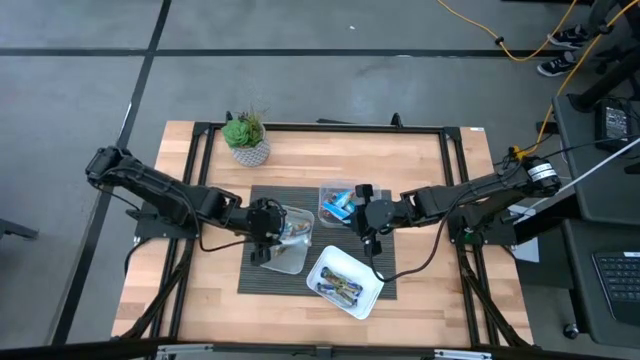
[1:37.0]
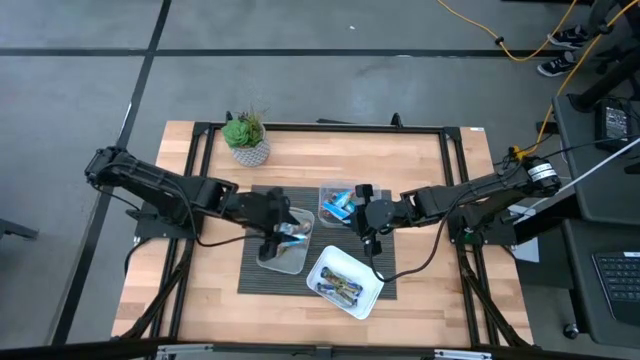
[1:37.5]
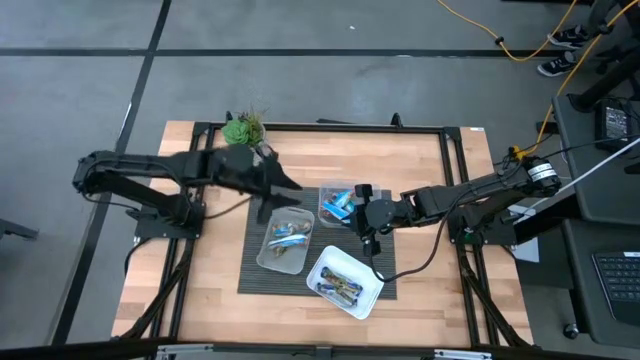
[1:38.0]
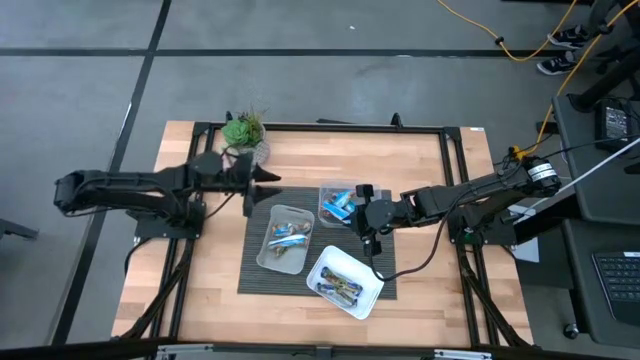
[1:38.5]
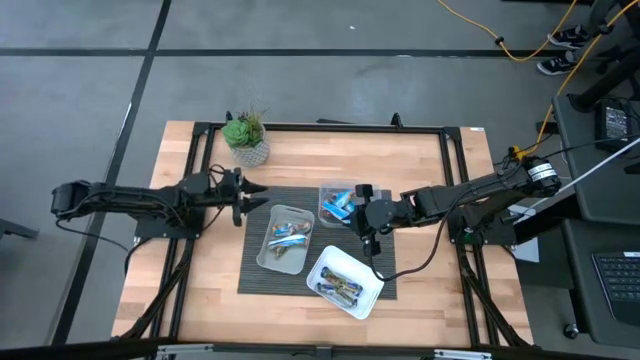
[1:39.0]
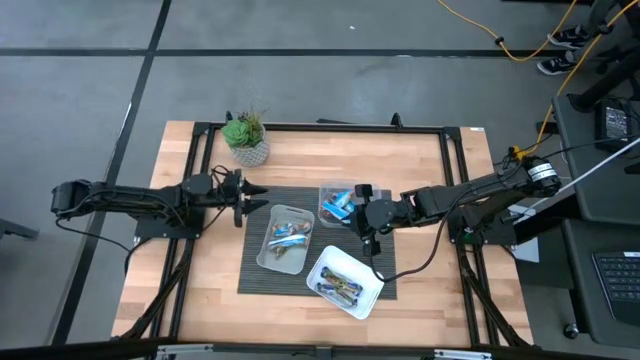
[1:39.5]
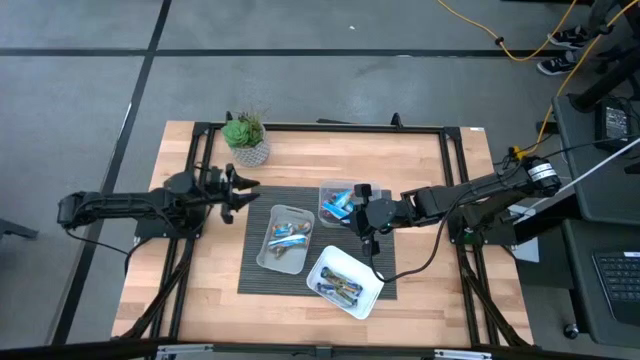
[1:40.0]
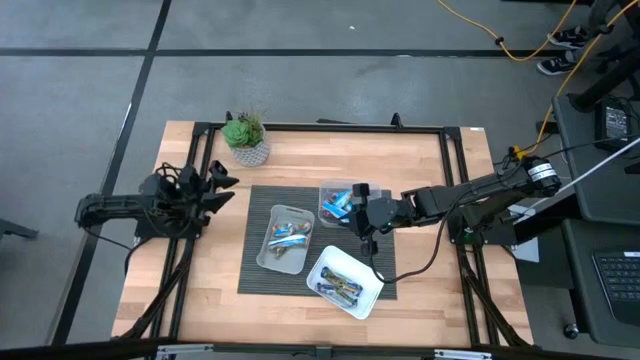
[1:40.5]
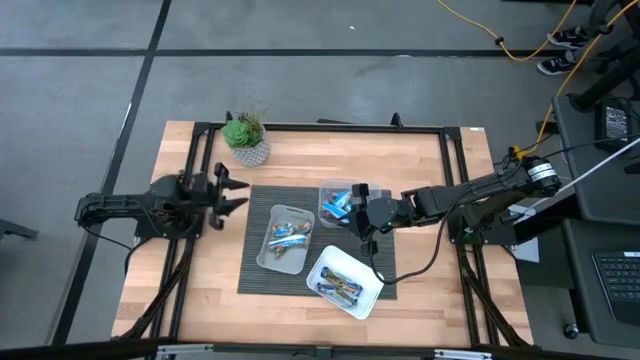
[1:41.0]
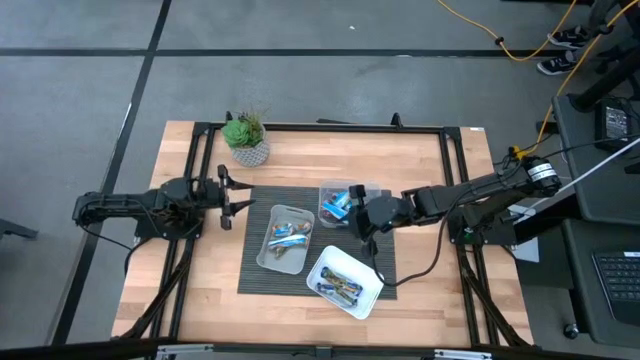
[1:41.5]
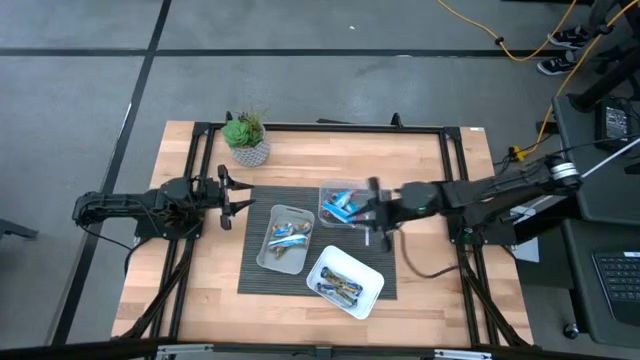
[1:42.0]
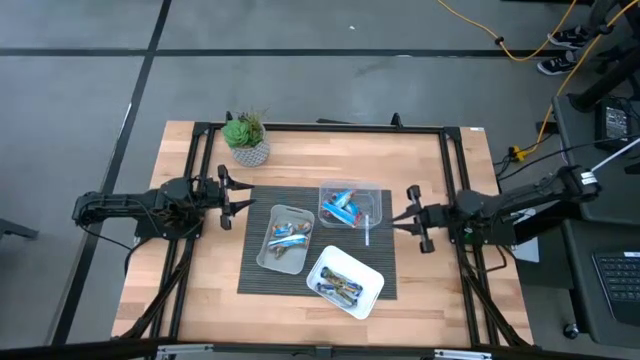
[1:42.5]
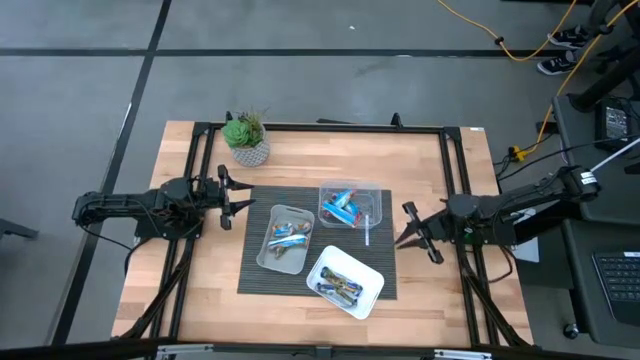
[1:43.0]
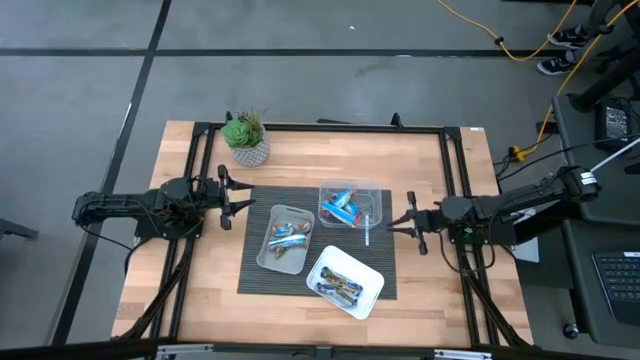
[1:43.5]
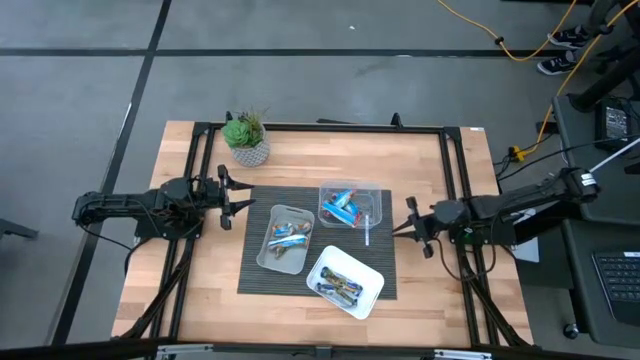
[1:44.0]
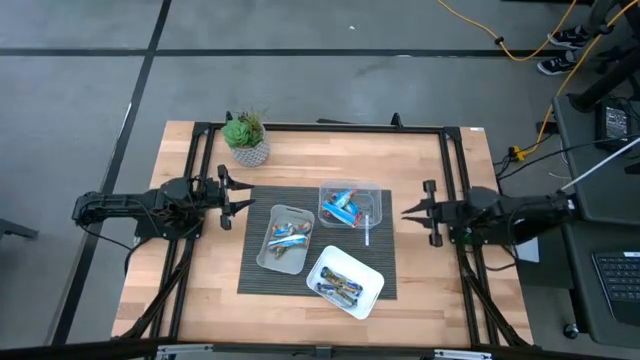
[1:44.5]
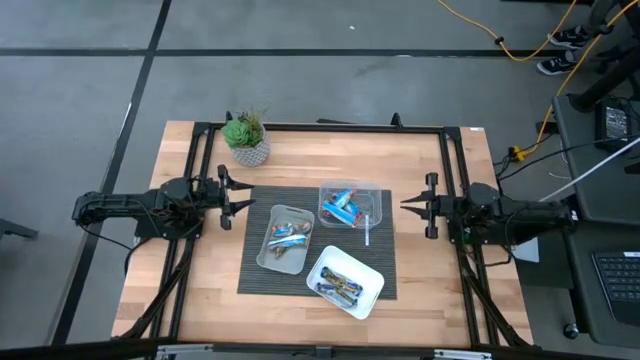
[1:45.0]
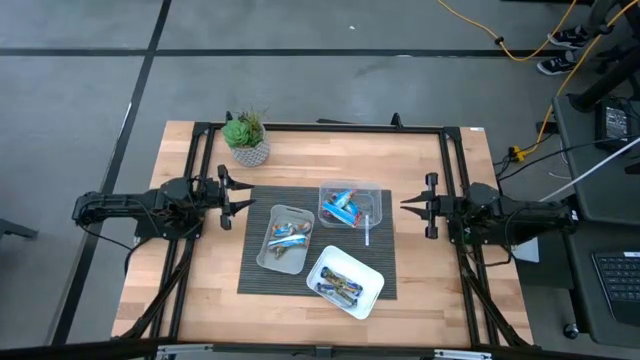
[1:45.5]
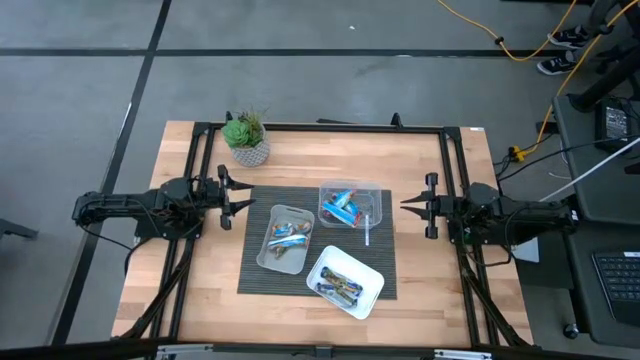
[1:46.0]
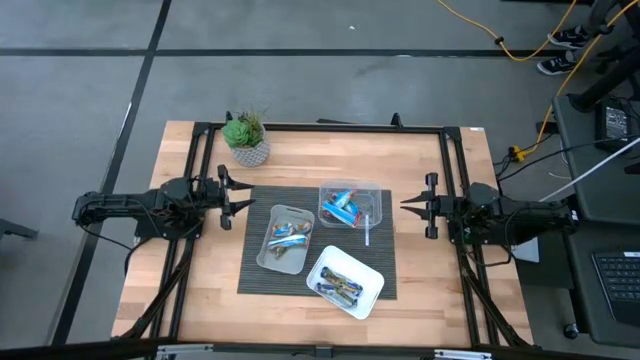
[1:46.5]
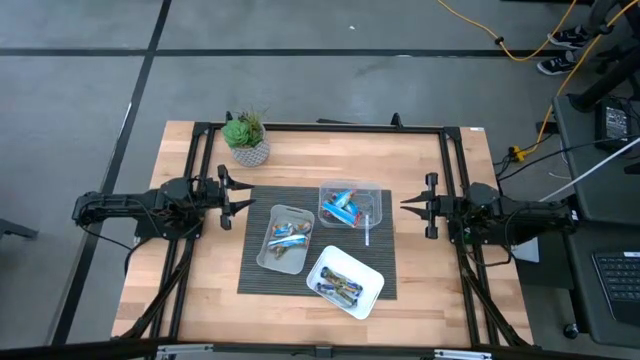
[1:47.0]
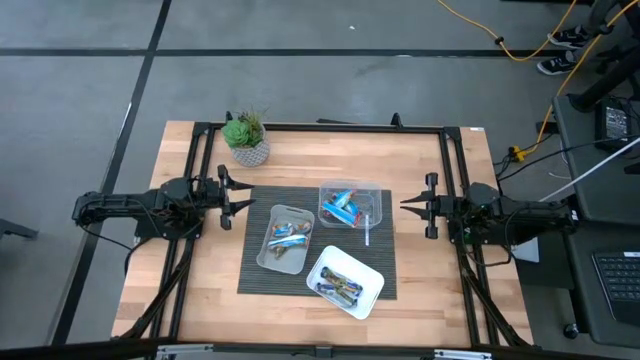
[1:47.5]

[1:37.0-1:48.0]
Task: Pick and place Granola Bars by type
Return to Home Position

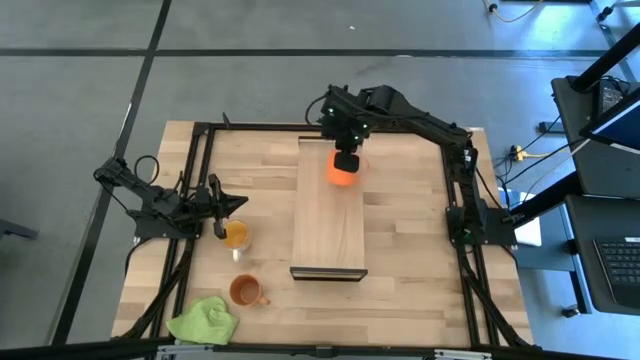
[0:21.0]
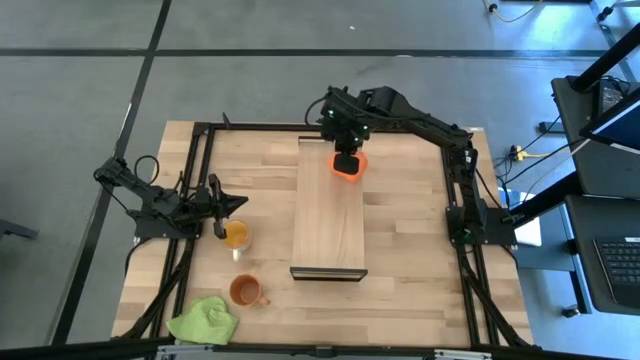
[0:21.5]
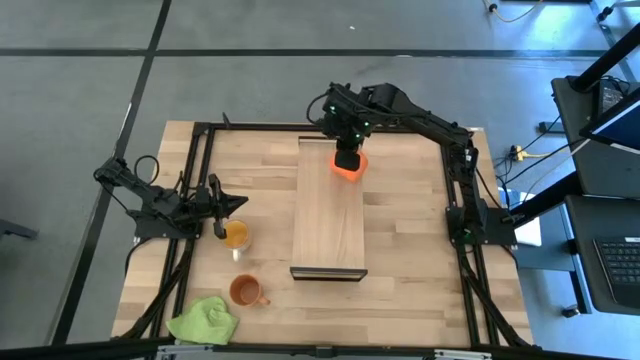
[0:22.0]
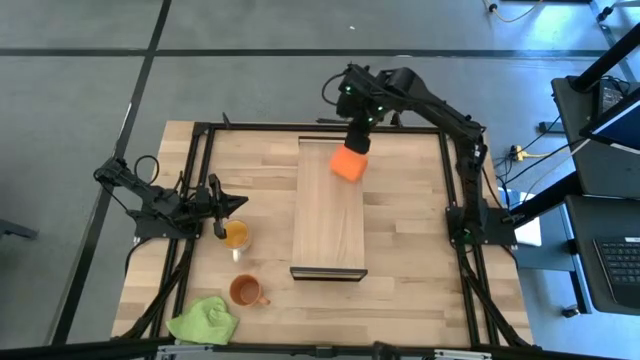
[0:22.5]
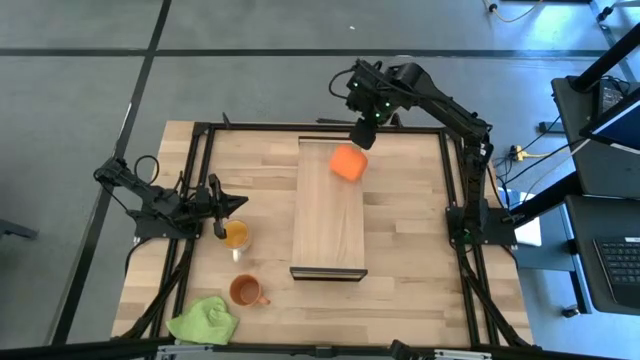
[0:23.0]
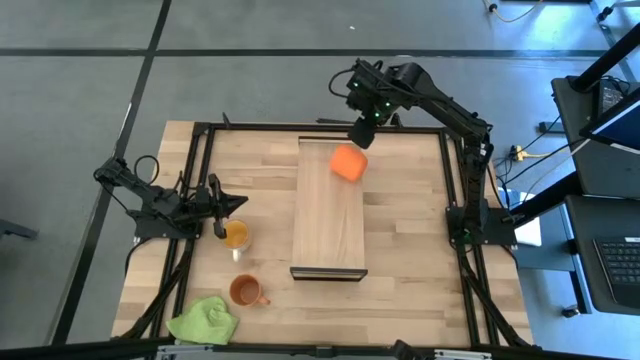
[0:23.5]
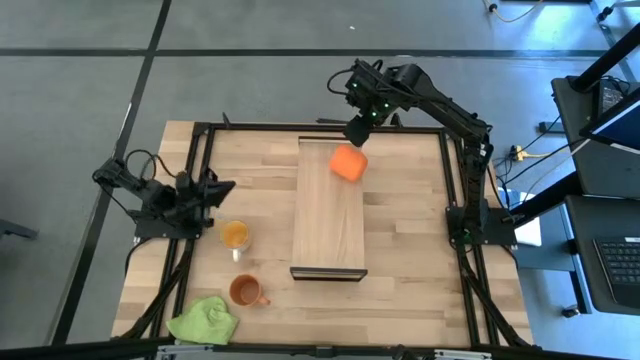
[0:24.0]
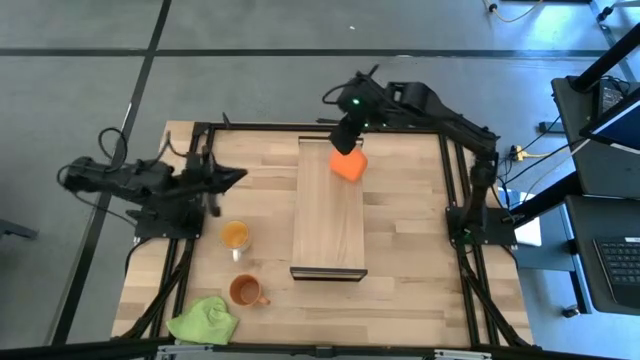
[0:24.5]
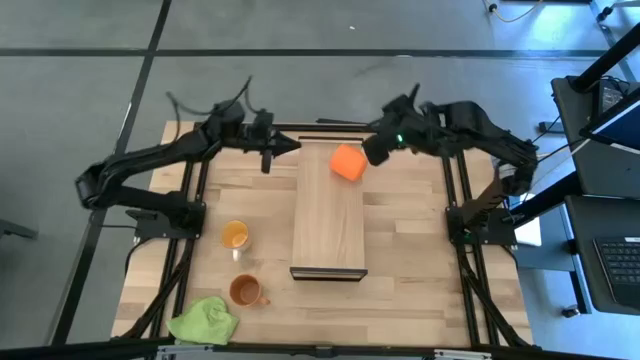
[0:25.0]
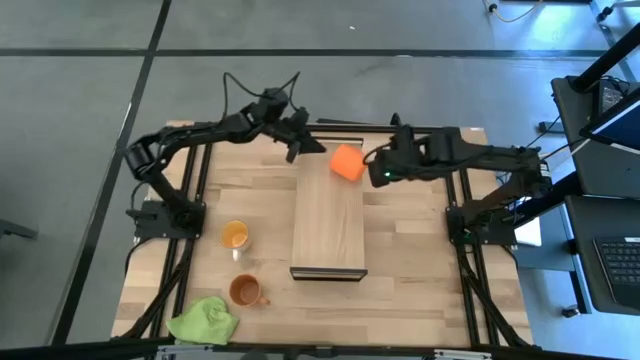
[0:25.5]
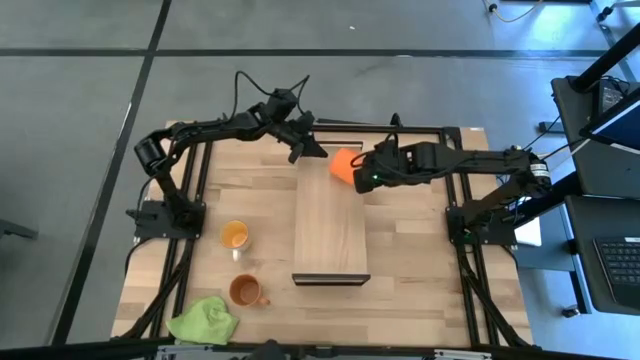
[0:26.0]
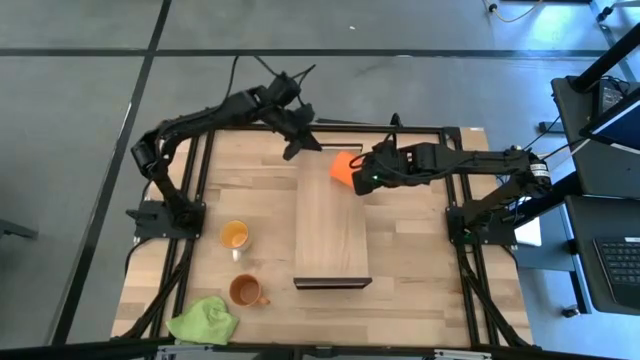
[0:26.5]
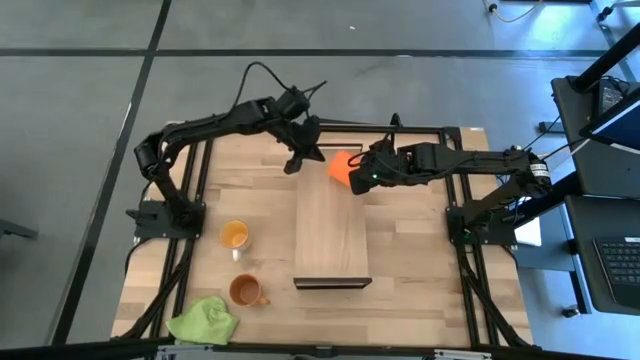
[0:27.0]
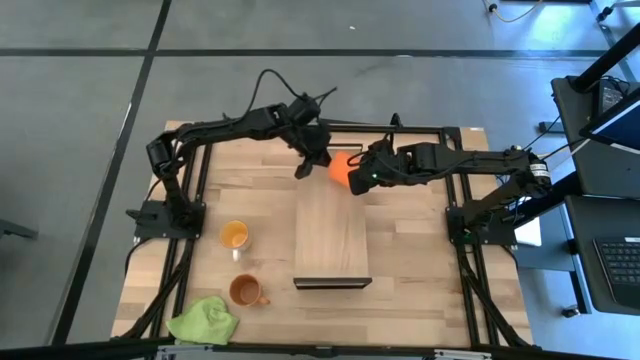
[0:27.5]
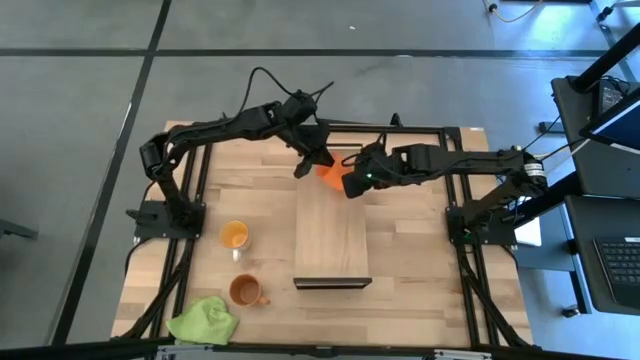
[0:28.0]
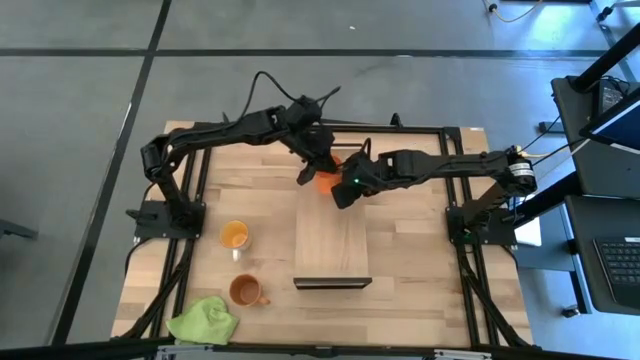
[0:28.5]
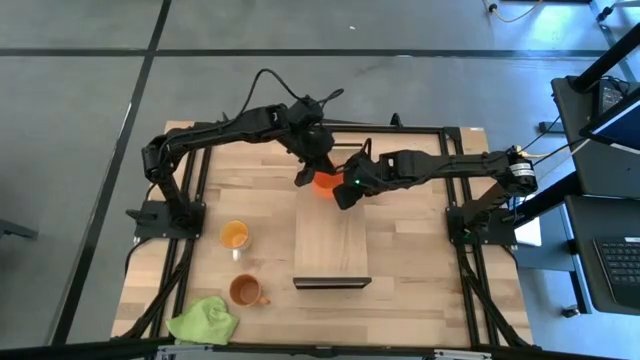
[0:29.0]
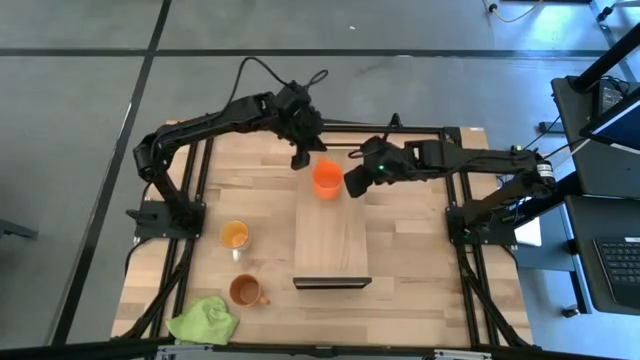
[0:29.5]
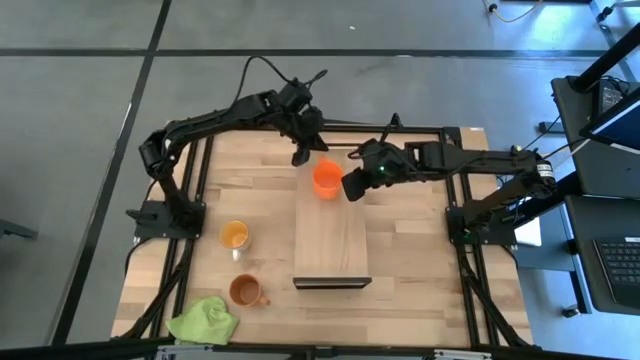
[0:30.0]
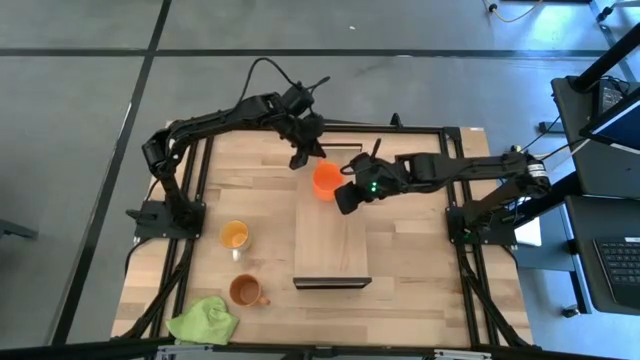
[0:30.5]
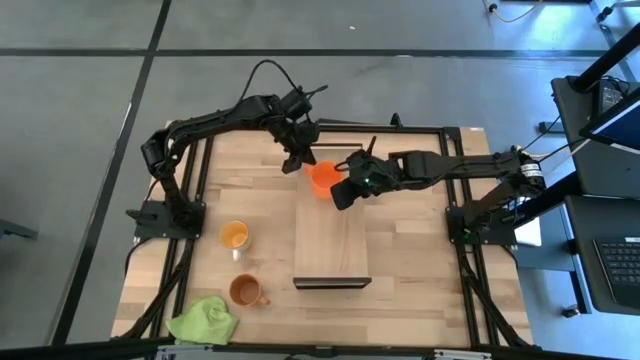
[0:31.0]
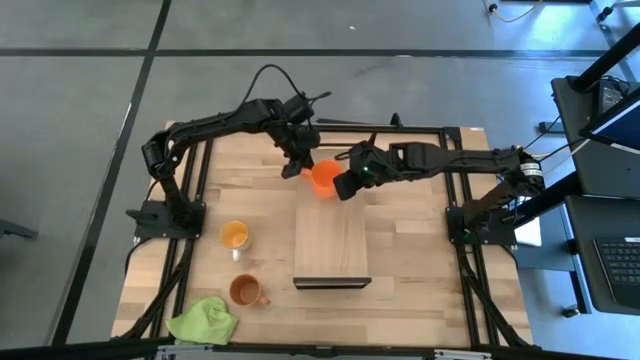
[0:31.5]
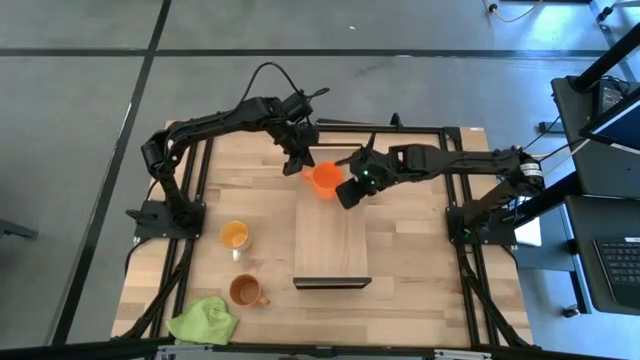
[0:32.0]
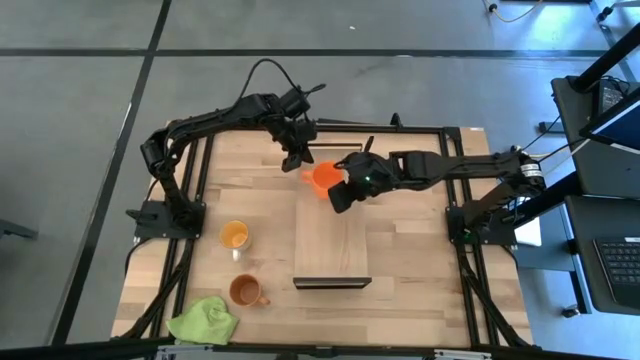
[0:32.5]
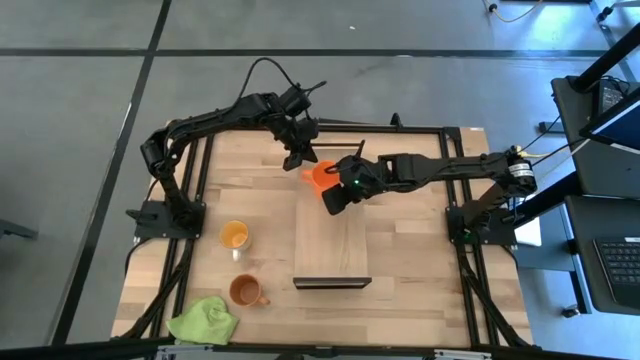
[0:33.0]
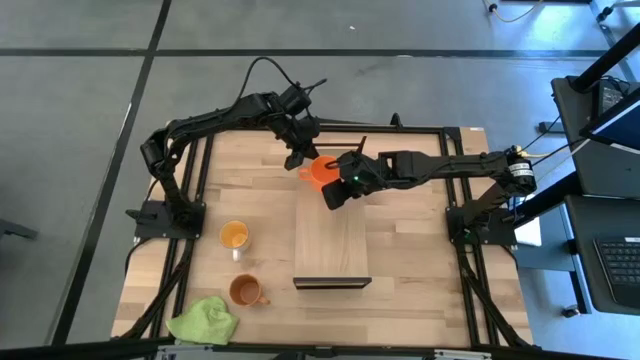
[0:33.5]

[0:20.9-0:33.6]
Task: Stack small to large cups/mugs on shelf
Adjust the orange mug on the shelf
